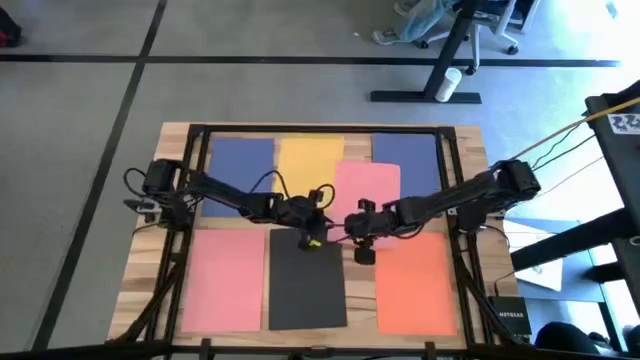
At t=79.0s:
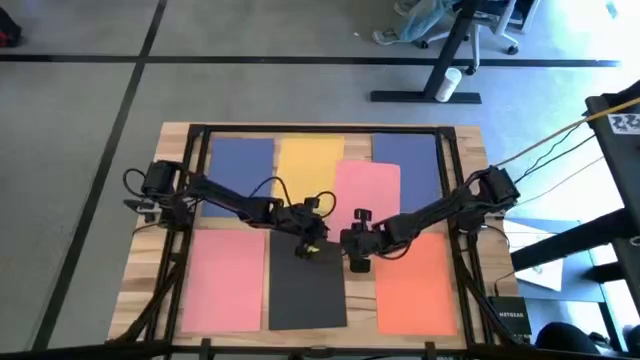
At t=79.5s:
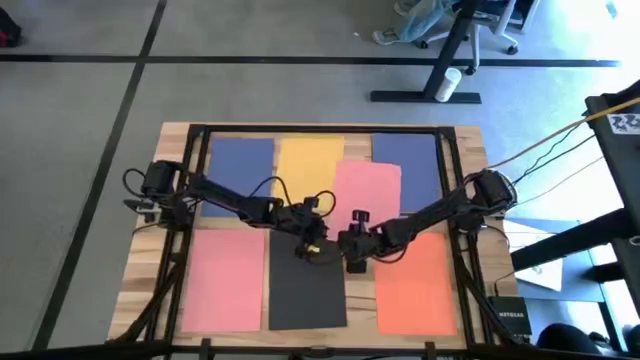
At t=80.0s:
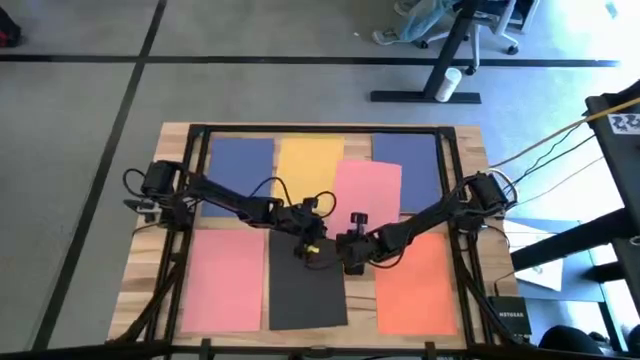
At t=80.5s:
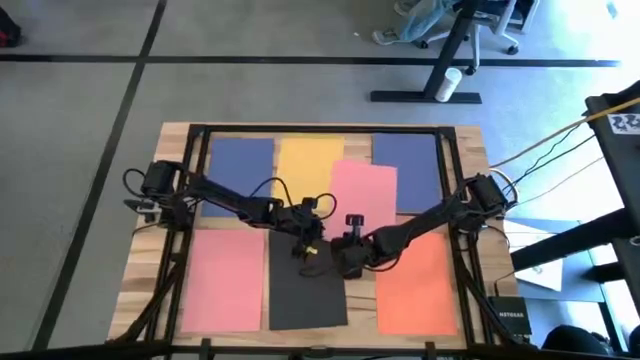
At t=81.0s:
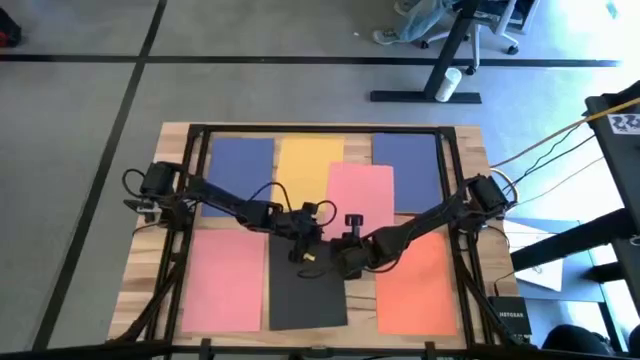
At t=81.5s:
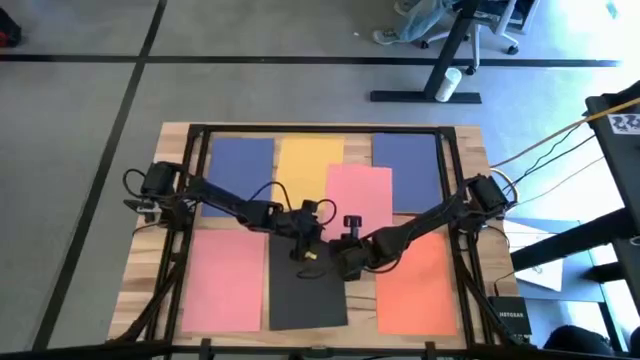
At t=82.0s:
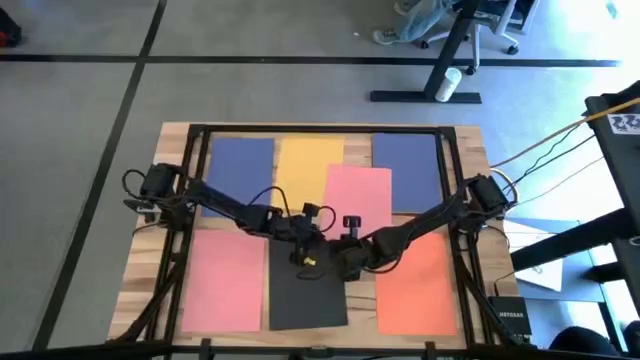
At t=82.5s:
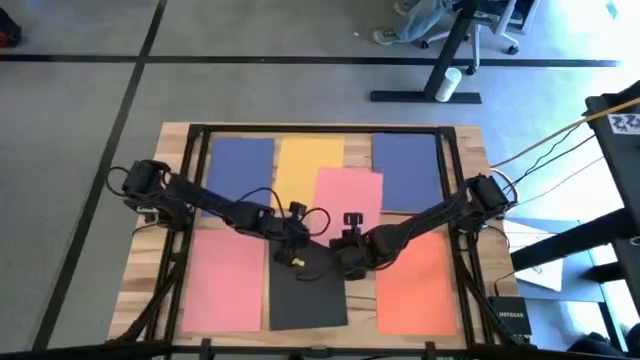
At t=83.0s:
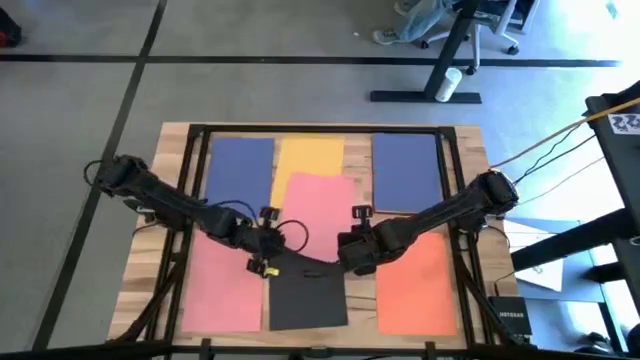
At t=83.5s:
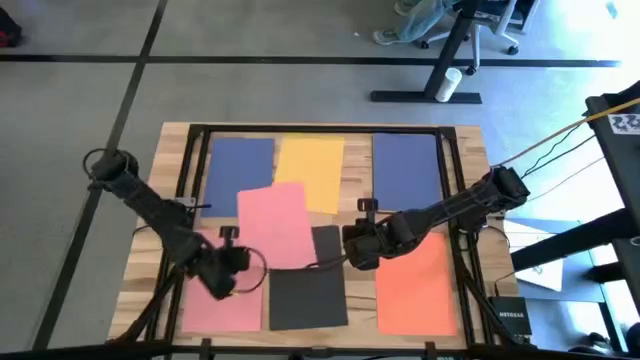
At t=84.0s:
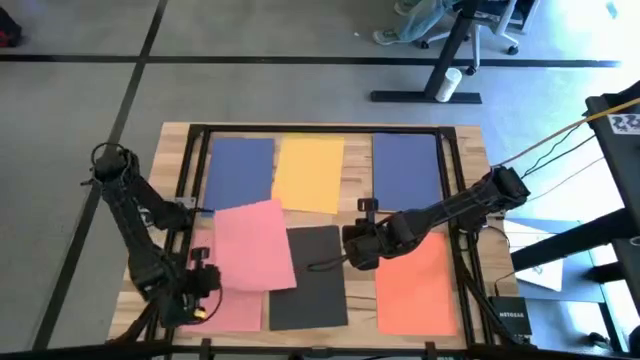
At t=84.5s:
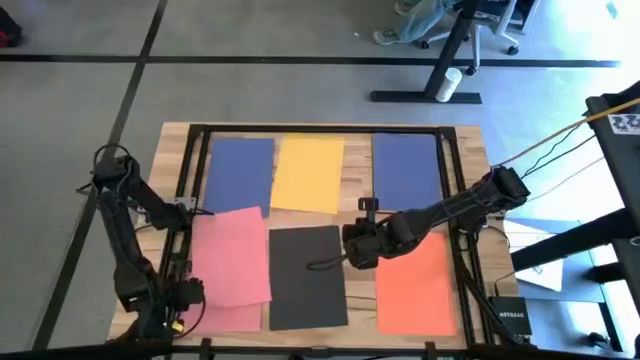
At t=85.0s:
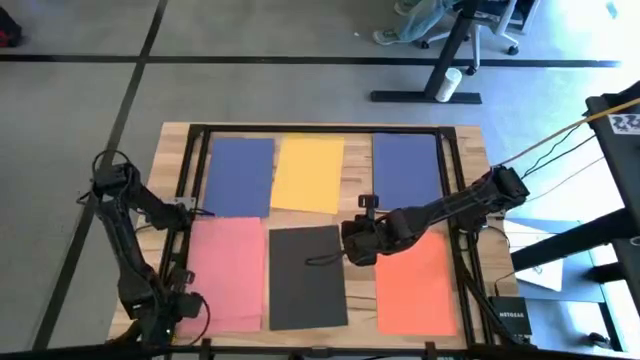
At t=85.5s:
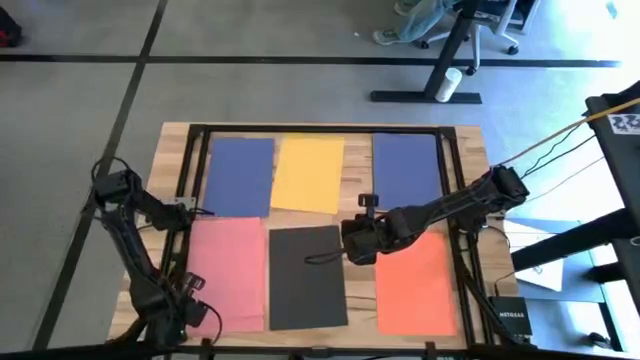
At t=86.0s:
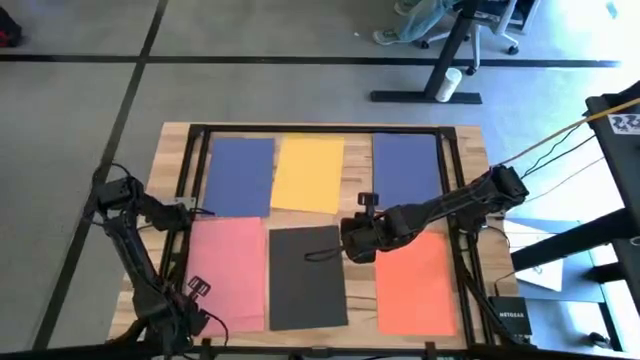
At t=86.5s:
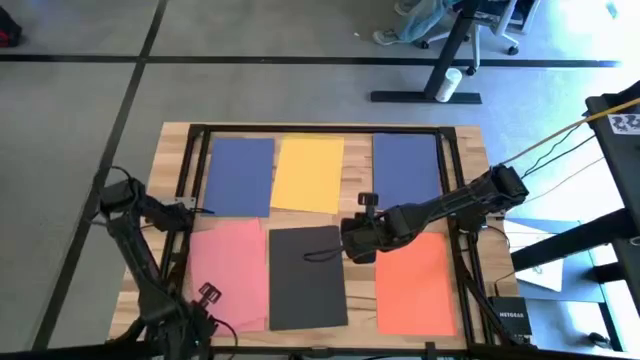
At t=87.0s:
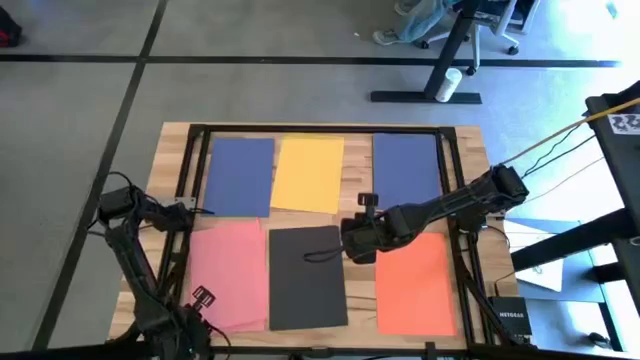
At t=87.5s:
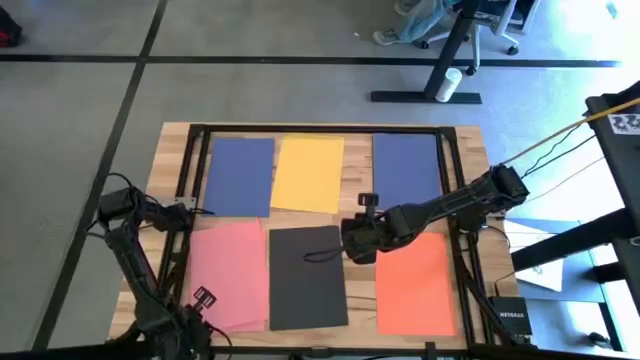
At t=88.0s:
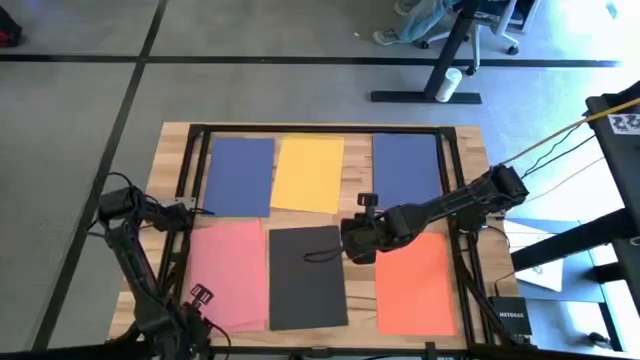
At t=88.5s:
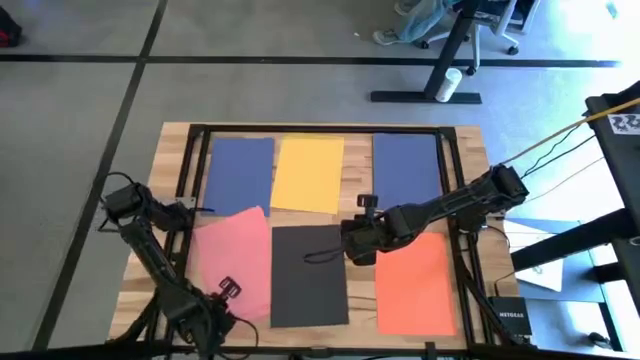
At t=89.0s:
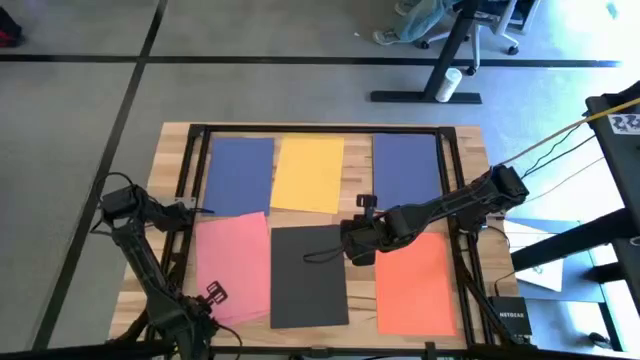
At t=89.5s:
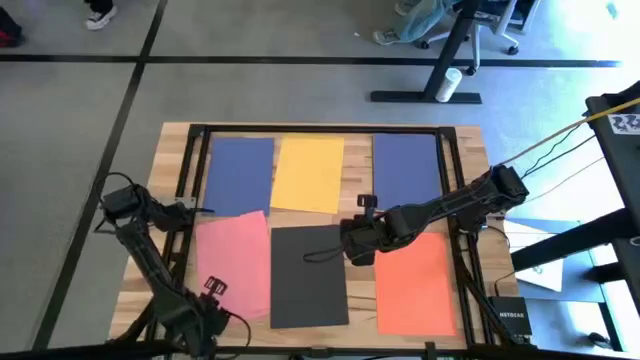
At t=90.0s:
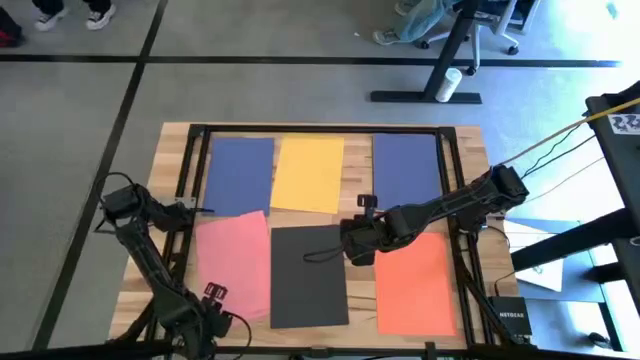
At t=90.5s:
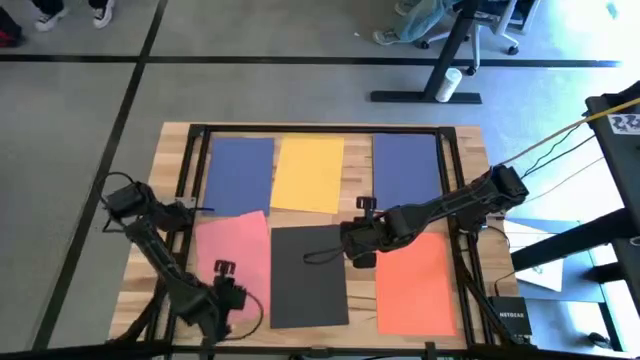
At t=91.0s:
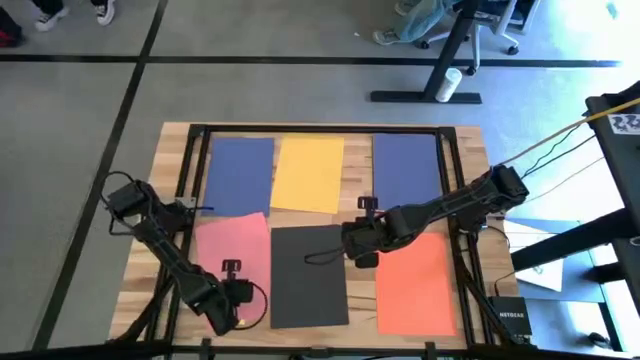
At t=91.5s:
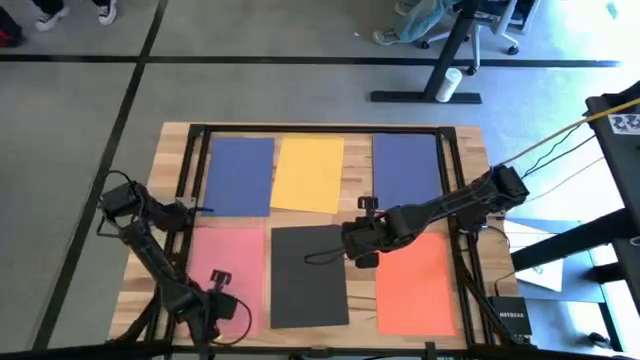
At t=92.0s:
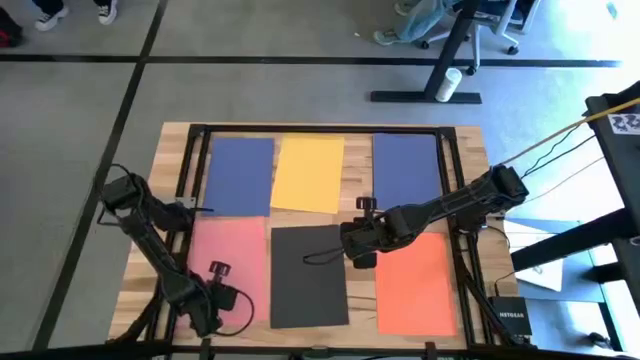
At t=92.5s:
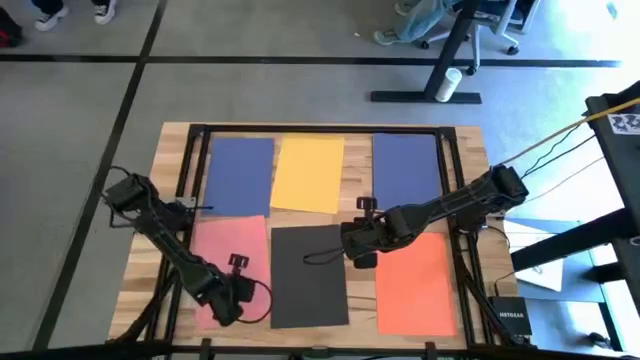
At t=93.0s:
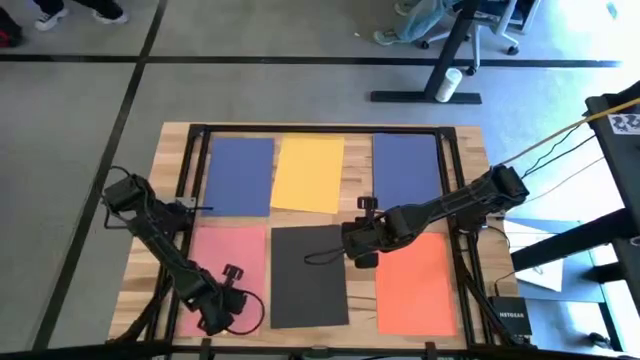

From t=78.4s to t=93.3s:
Task: Organize paper
Stack the pink paper on top of the other pink paper

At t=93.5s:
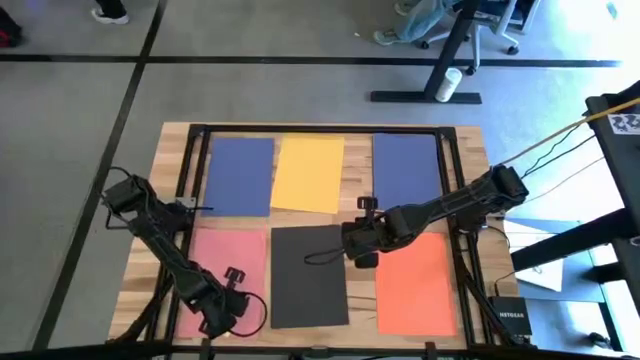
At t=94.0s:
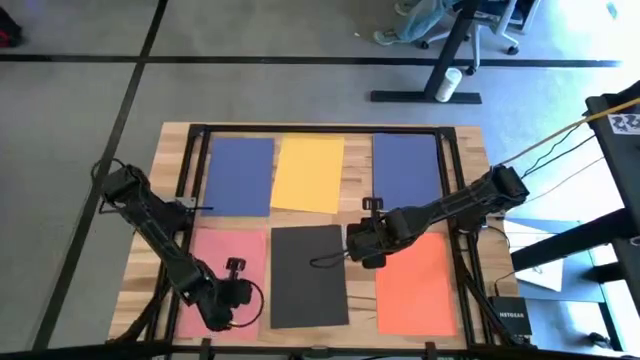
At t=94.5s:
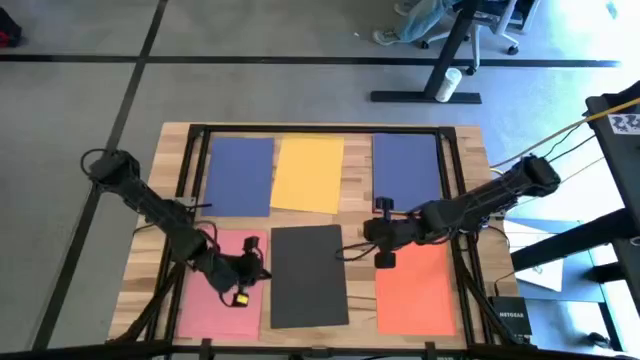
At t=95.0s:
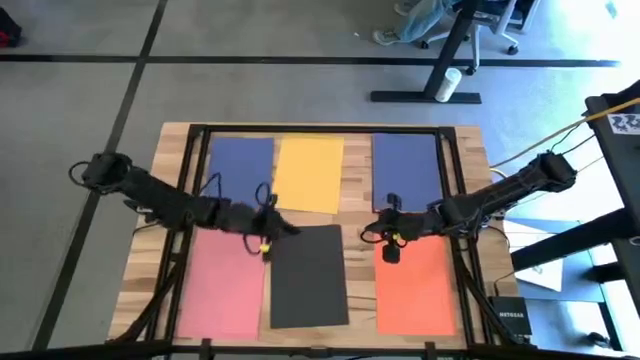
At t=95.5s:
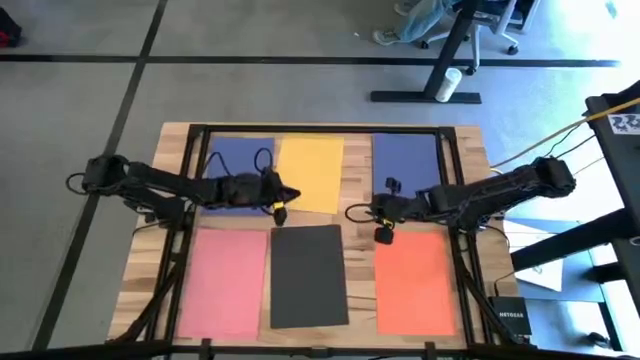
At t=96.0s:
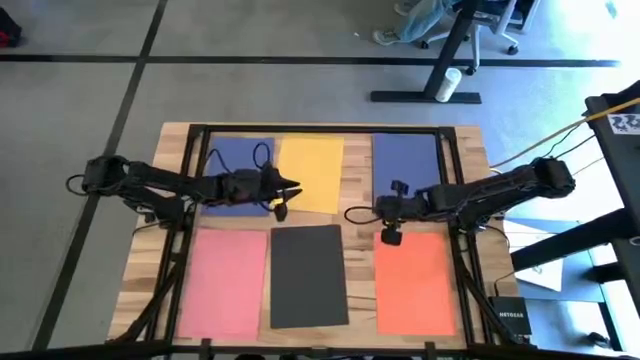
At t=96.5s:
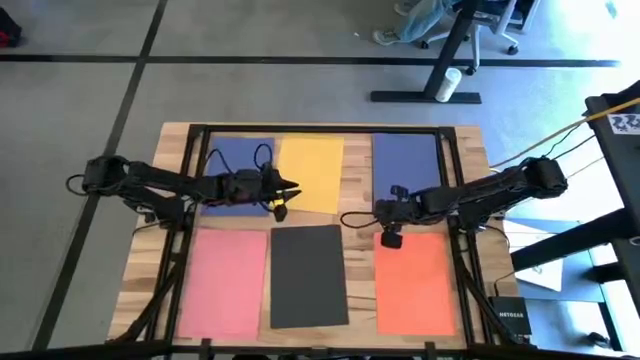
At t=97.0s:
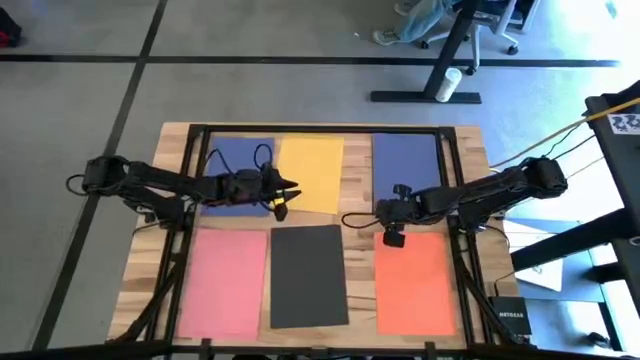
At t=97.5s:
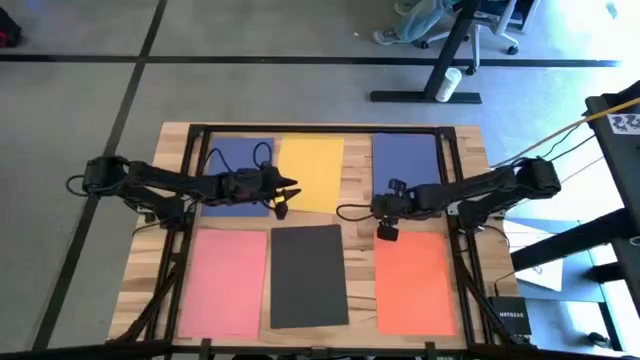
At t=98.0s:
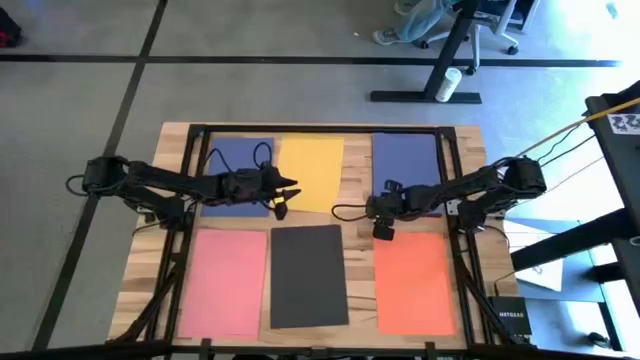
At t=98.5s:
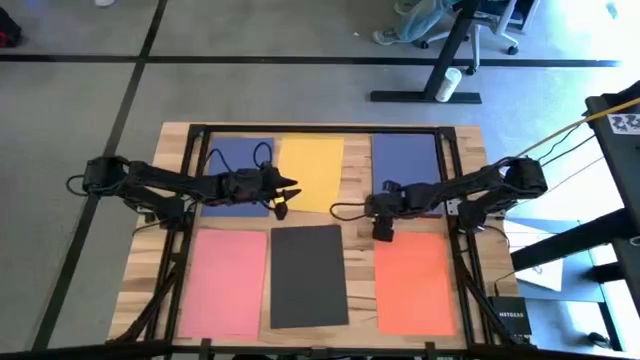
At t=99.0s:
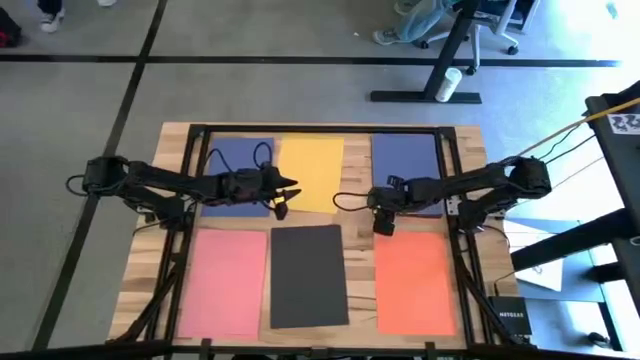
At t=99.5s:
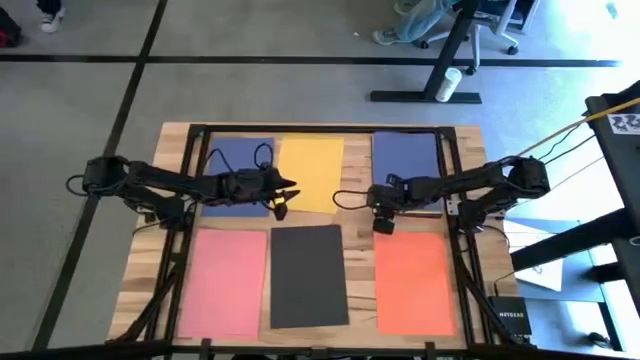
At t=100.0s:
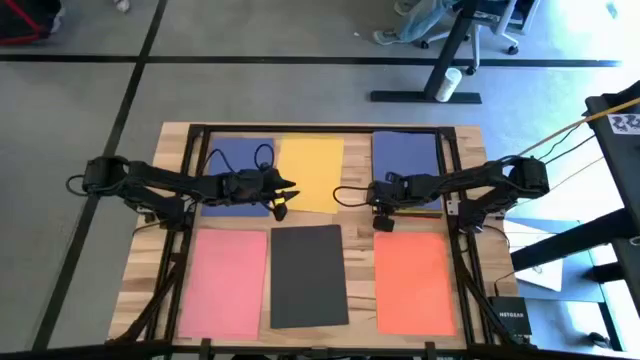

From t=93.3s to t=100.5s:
Stack the blue paper on top of the other blue paper
